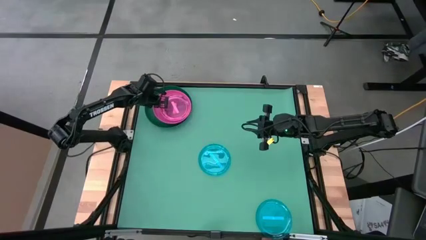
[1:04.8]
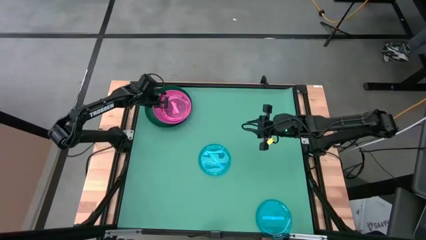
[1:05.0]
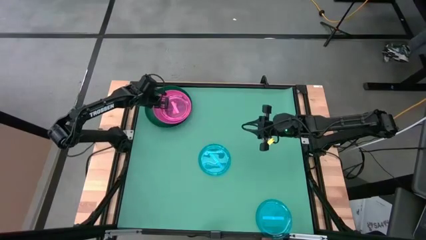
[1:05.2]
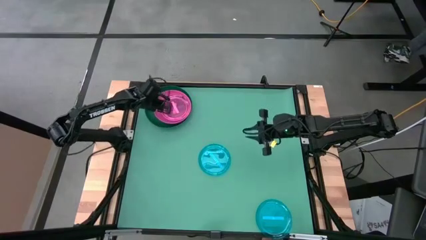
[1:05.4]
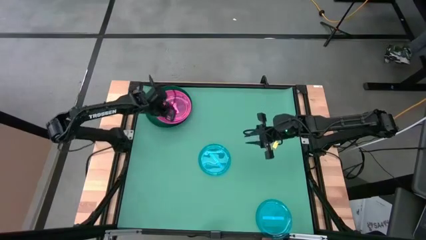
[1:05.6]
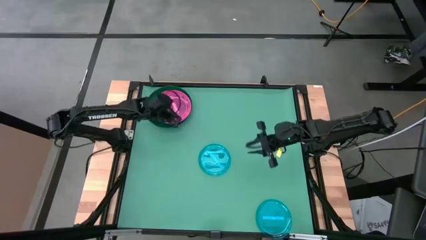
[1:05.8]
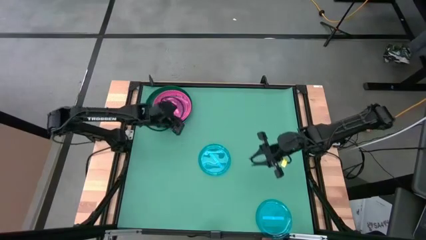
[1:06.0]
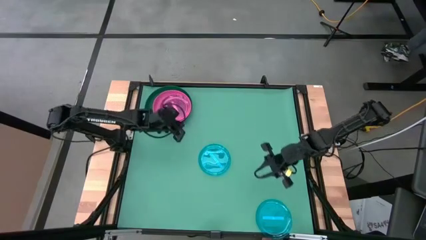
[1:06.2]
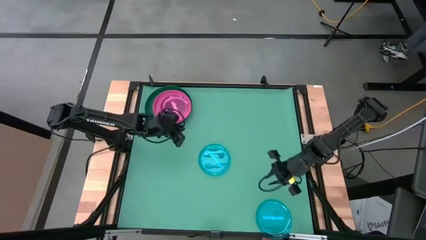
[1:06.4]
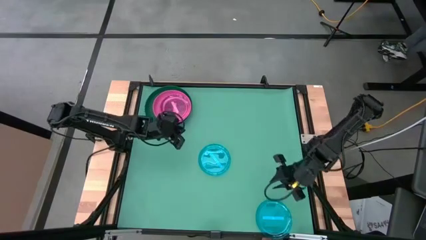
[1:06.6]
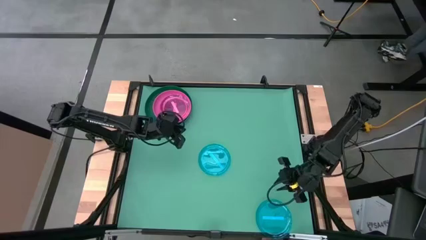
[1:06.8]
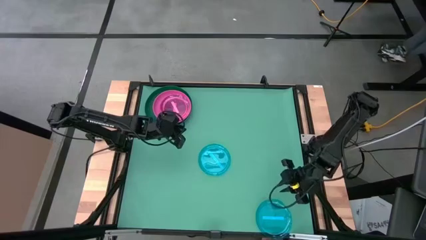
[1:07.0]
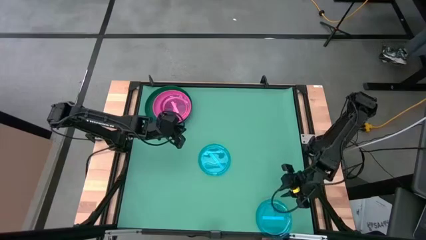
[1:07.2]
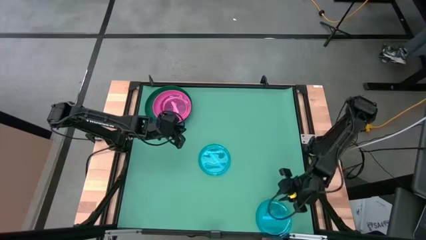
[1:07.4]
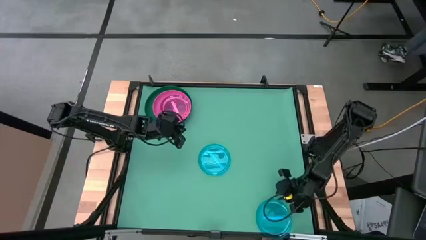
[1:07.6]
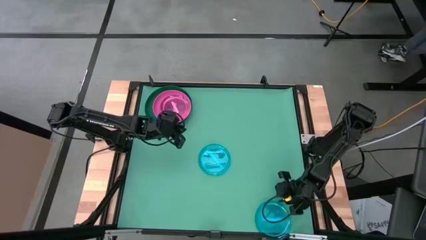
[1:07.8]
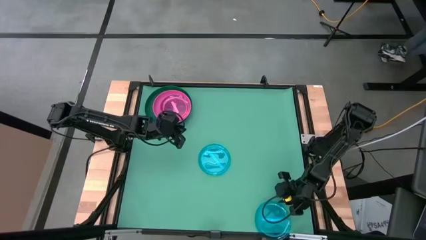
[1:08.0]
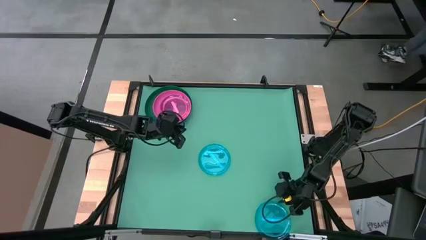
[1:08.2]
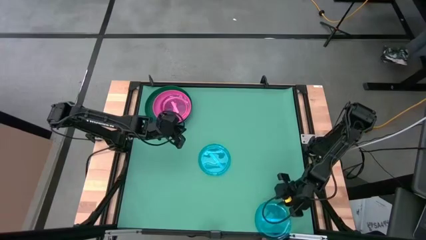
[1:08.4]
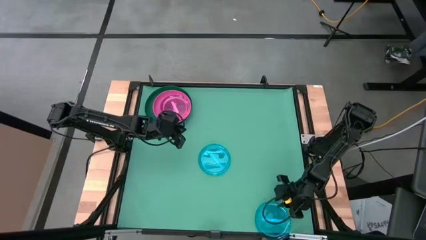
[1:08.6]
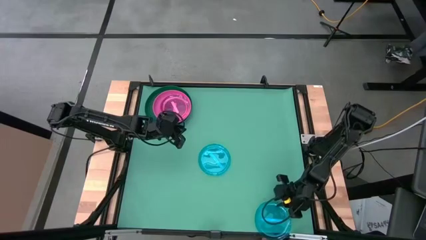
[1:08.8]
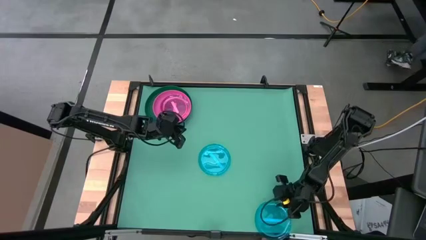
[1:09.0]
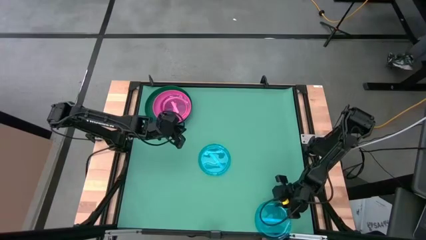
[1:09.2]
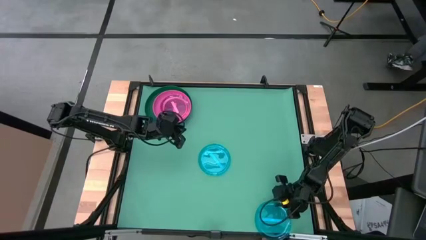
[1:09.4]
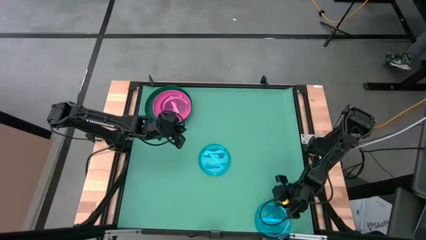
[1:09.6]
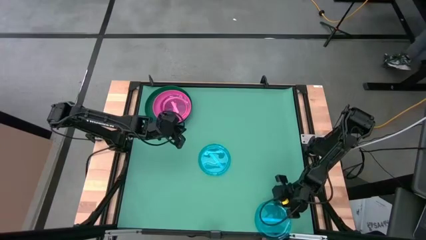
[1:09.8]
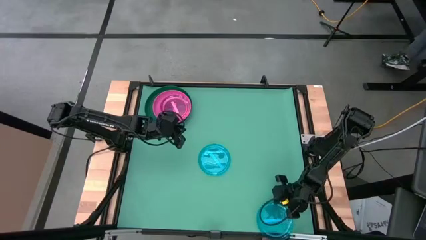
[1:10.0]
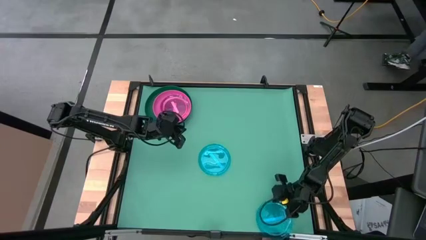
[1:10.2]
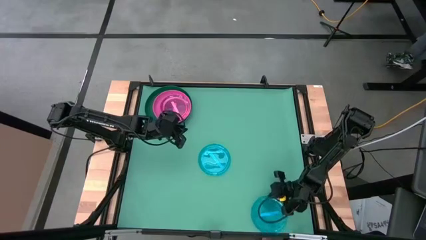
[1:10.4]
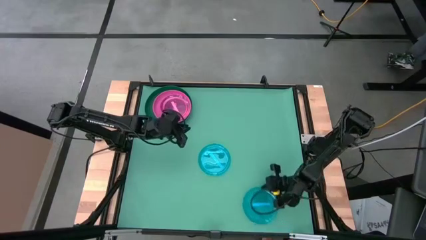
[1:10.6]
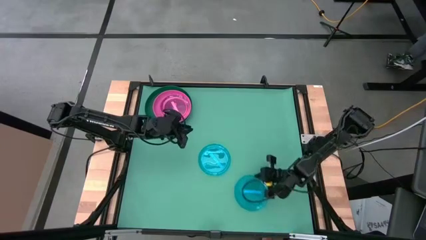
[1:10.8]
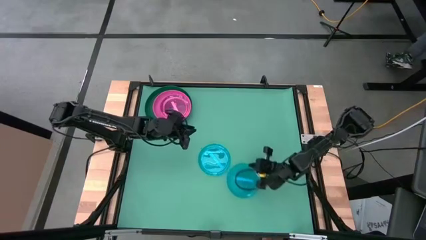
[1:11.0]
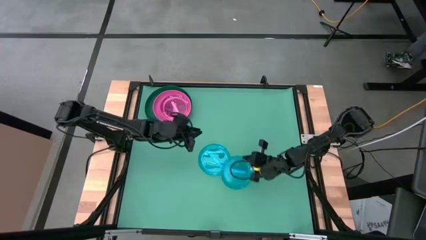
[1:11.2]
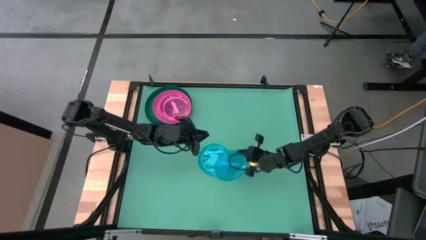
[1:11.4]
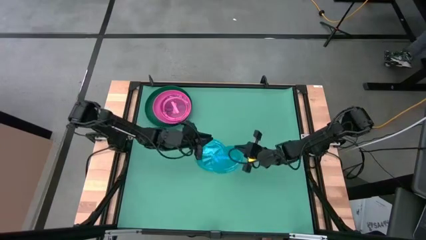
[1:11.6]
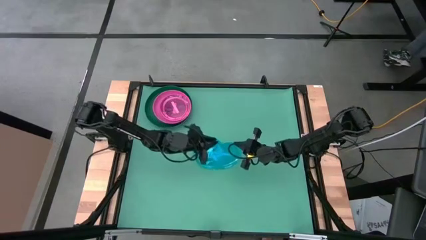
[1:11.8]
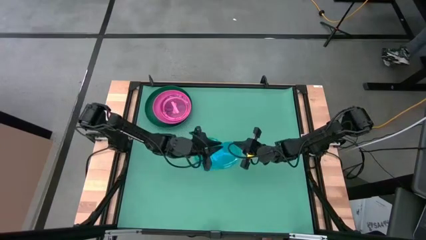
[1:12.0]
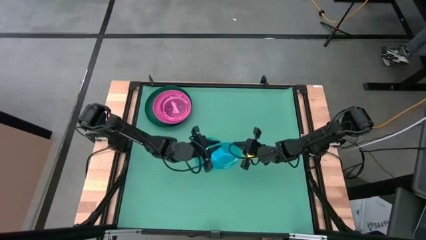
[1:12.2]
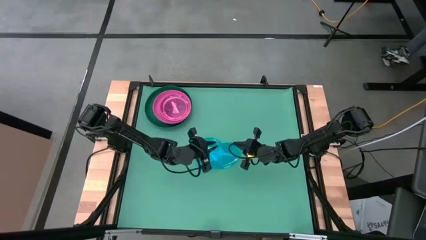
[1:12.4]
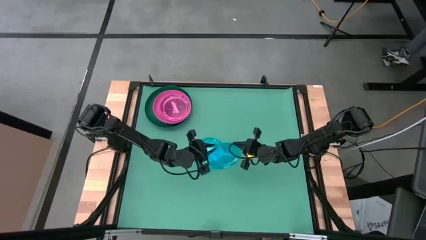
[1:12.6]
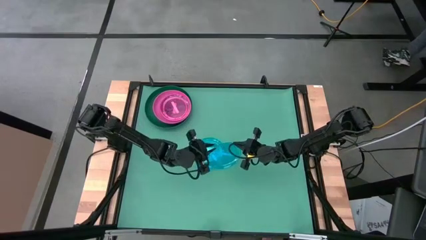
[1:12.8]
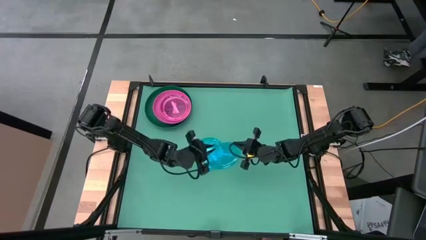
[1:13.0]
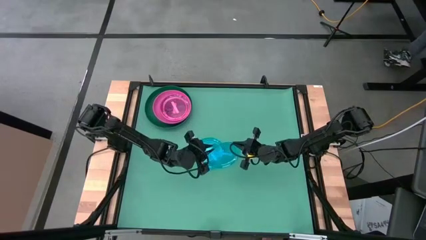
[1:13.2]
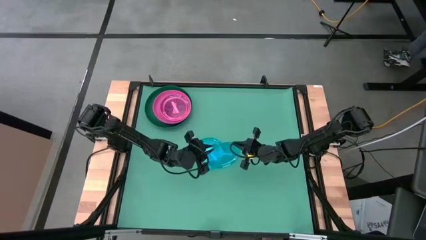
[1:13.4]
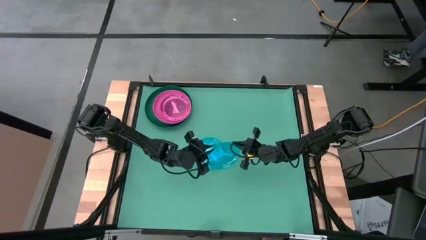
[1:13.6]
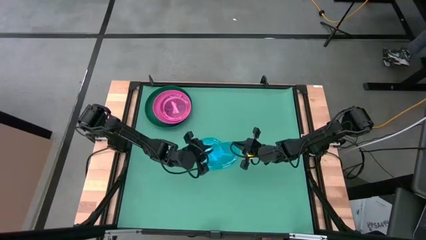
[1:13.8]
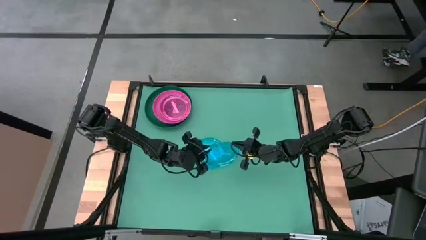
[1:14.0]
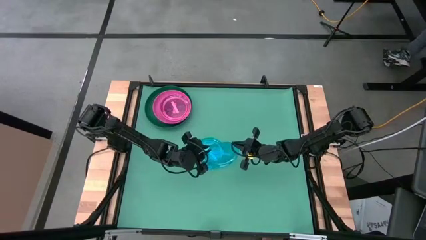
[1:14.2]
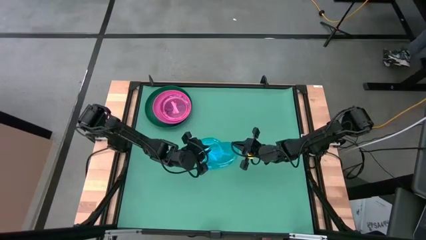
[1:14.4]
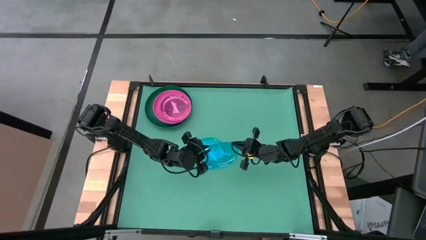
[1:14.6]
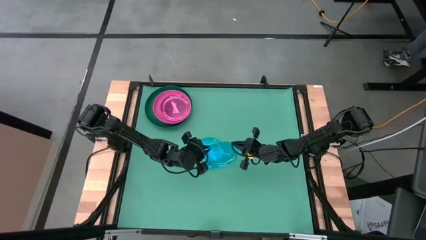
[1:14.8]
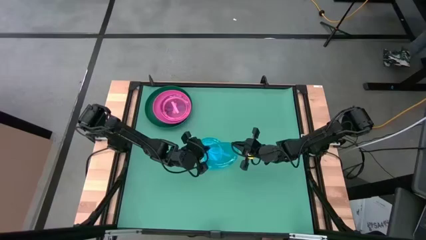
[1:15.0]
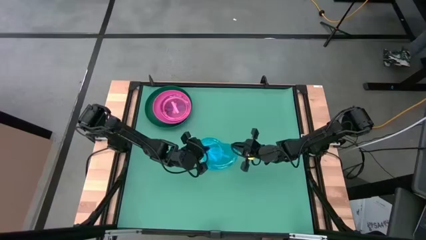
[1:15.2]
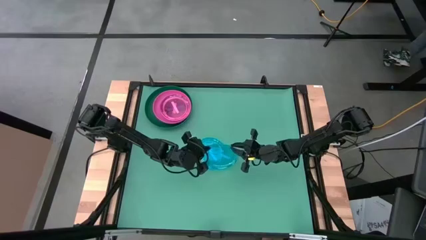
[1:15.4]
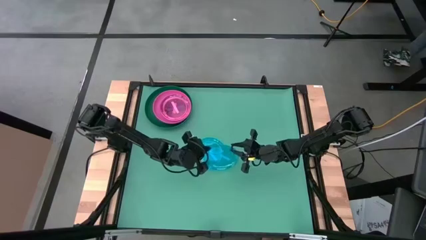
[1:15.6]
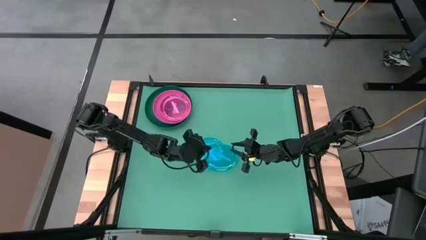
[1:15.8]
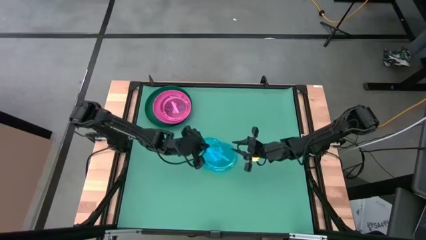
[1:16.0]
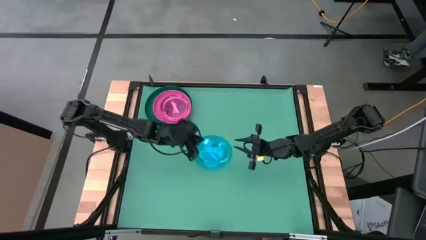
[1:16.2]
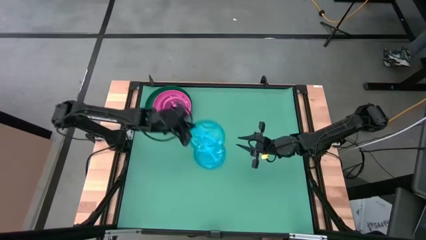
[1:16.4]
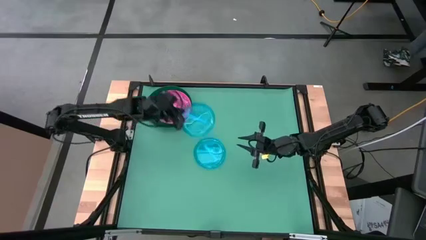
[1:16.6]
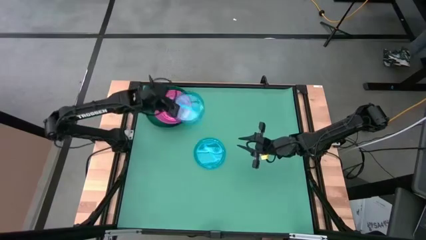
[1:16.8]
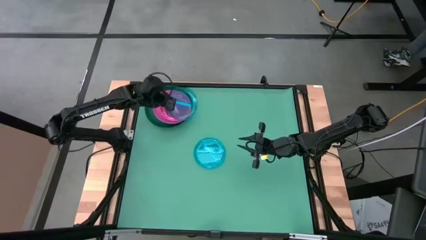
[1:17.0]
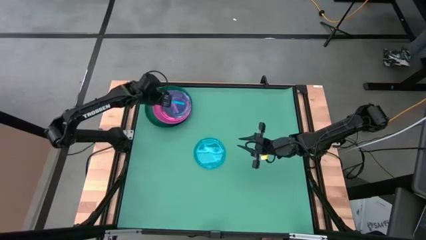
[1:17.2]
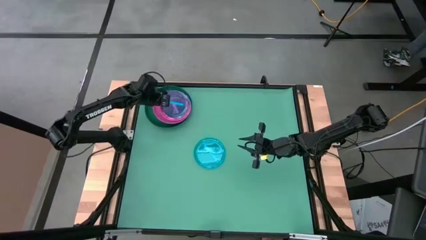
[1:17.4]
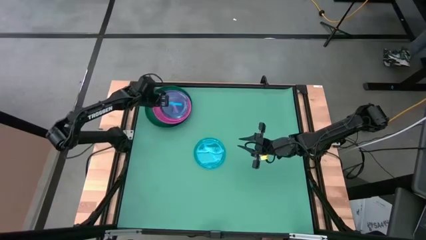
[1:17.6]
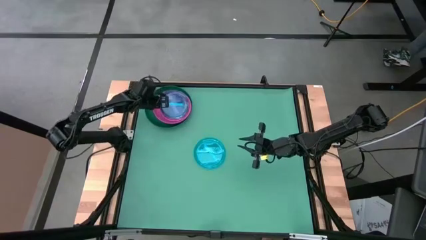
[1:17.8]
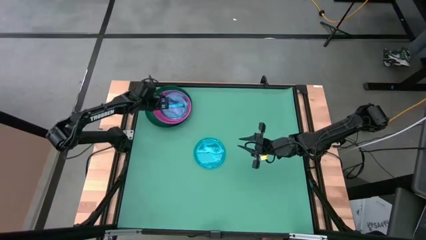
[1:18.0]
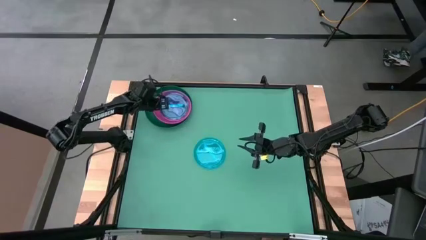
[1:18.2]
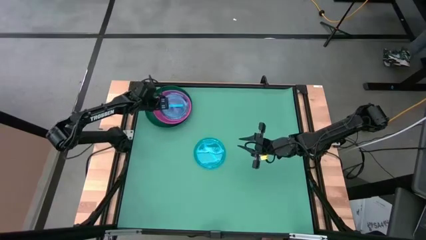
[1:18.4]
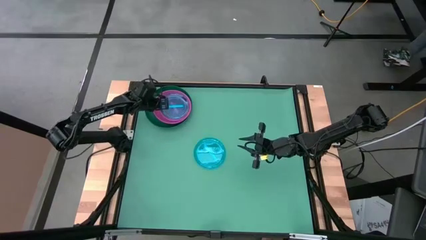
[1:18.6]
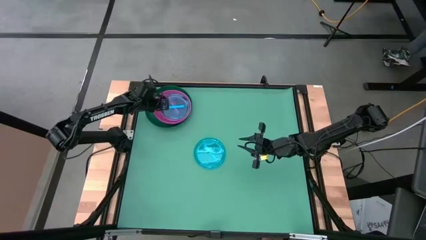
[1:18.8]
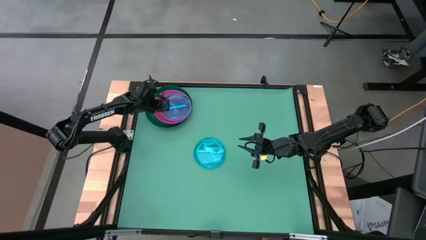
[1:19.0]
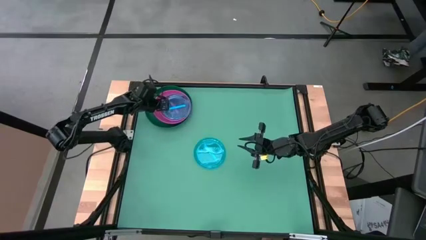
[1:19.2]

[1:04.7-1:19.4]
Task: Stack plastic plates
Stack the bottom blue plate on top of the light pink plate

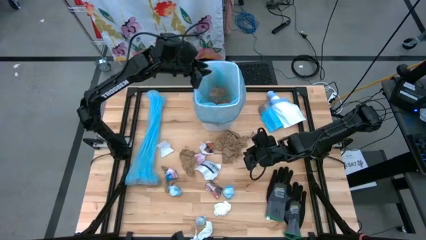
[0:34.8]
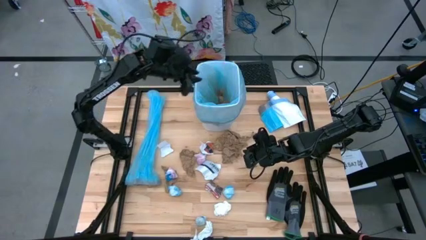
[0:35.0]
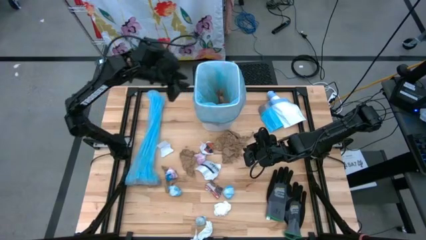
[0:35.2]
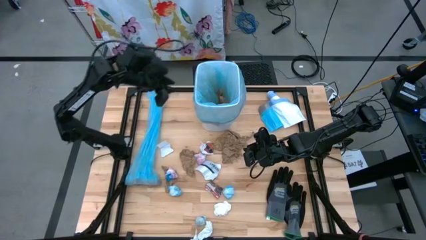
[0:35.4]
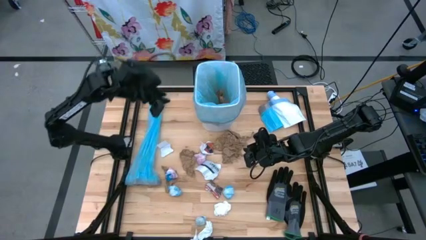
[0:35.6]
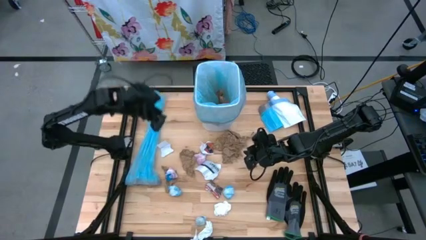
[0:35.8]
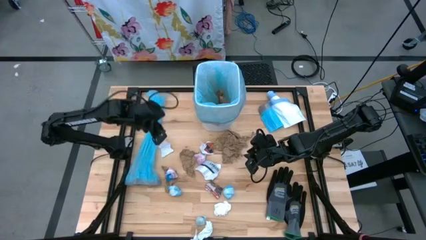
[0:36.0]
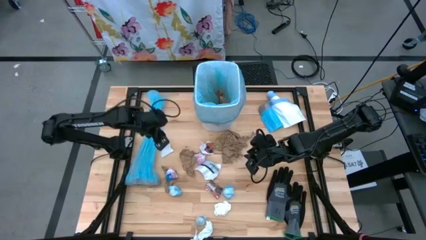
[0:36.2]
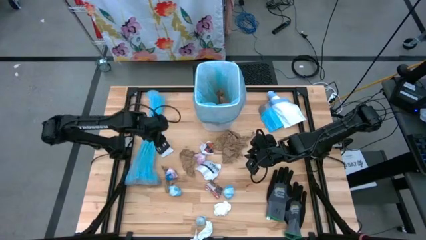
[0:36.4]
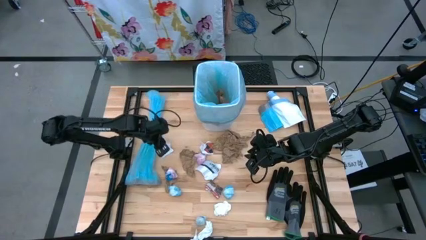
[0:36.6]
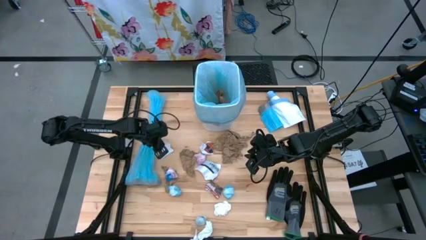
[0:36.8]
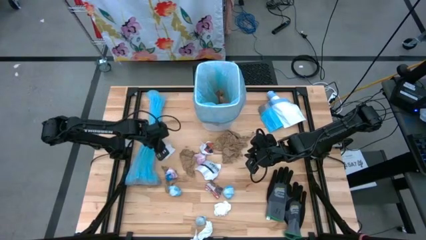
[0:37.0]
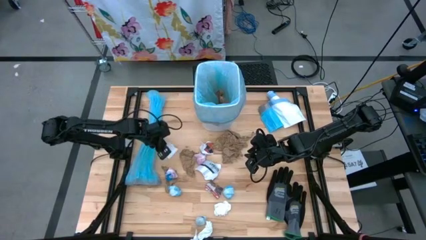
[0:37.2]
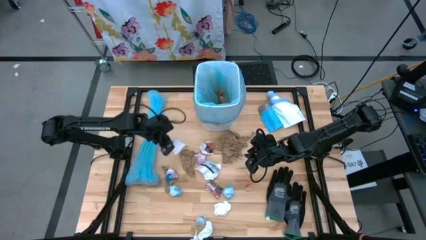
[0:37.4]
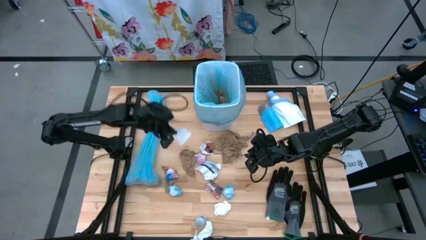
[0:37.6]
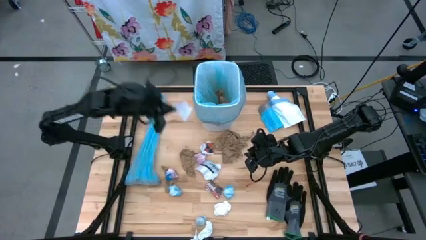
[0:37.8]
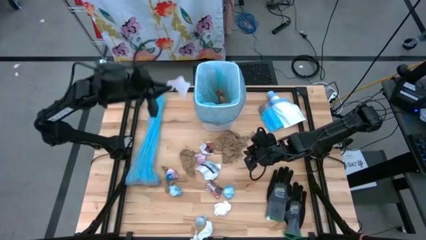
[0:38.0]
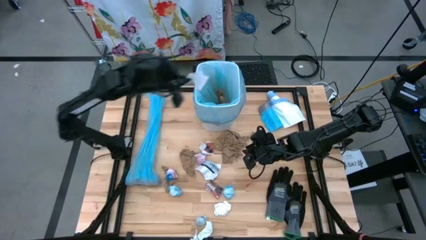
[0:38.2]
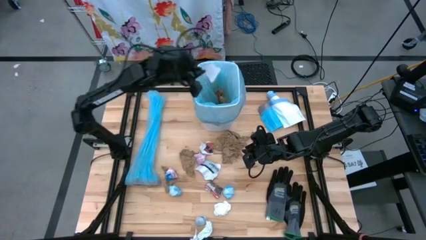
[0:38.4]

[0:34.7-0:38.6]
Task: place trash/remove bag and relplace
Put the white paper into the blue trash bag inside the white trash bin
